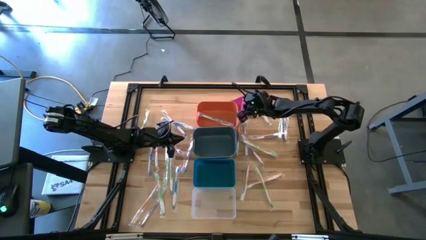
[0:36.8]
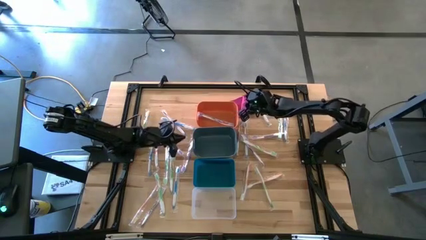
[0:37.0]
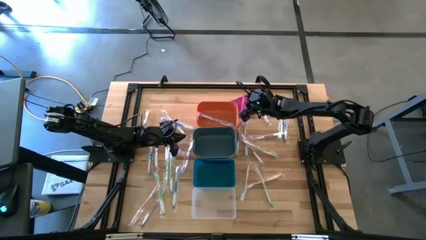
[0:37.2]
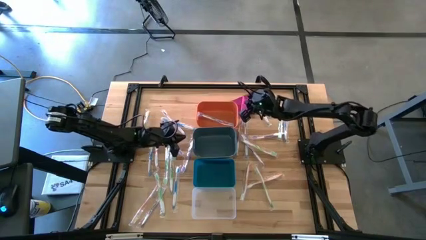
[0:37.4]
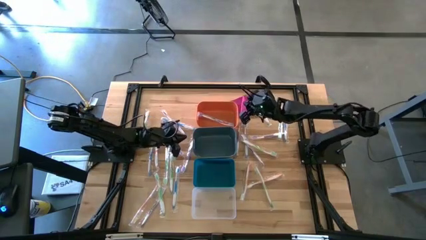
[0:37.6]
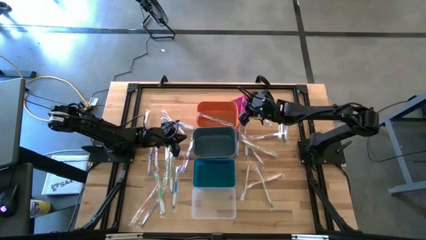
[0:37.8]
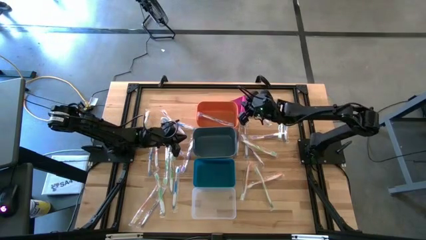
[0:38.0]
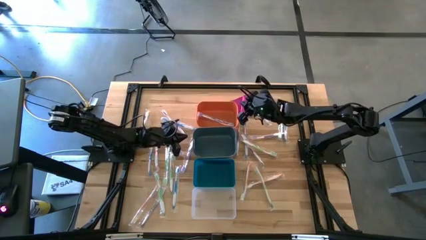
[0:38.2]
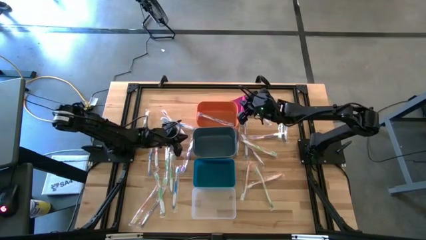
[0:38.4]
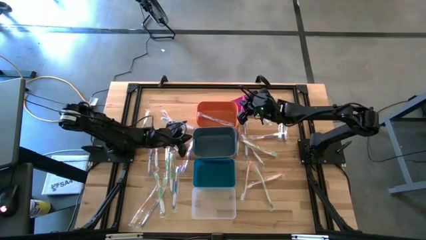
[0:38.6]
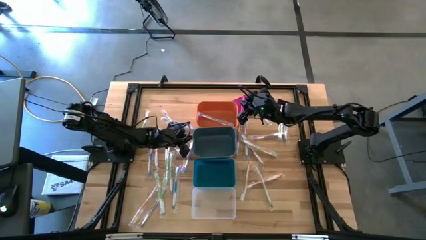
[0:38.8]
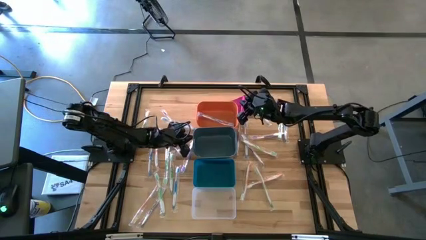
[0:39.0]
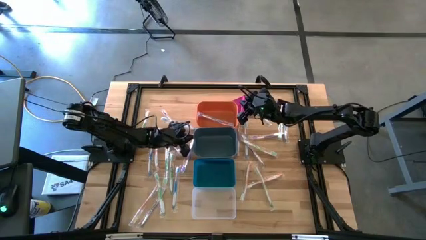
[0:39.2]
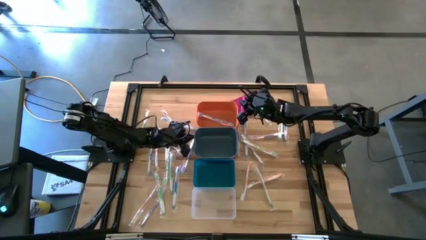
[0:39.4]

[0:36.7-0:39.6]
Task: Pick & Place Toothbrushes
Adjust the green bin

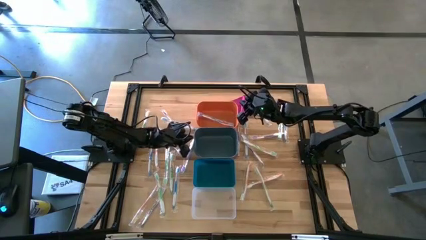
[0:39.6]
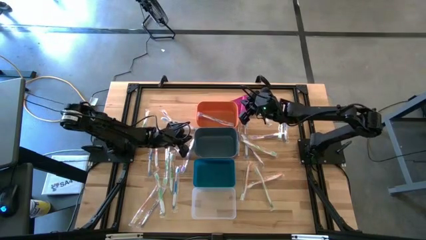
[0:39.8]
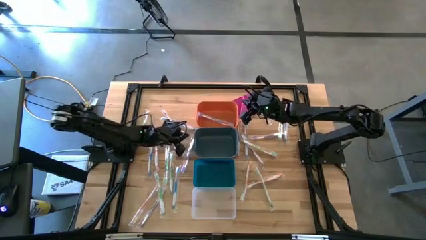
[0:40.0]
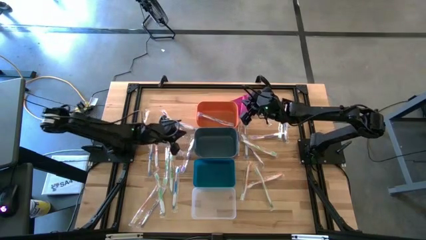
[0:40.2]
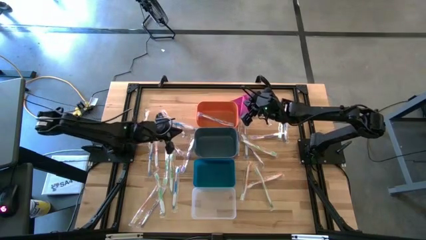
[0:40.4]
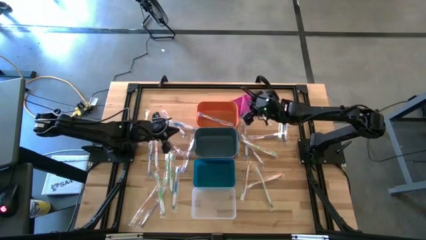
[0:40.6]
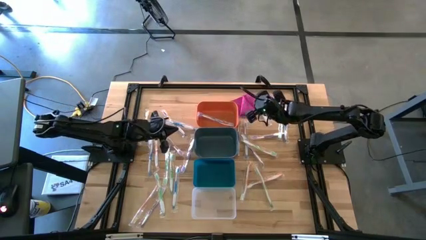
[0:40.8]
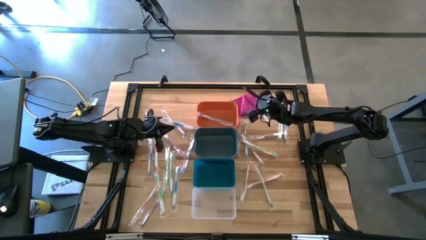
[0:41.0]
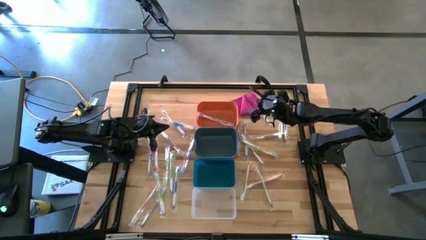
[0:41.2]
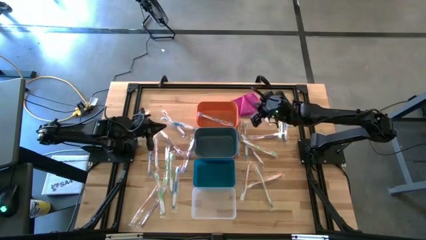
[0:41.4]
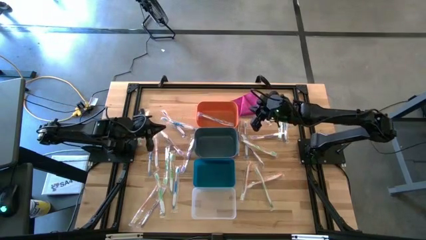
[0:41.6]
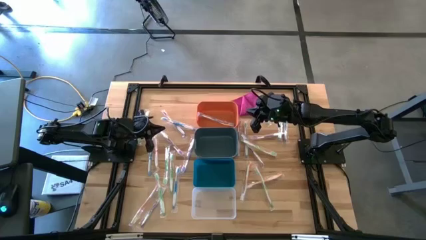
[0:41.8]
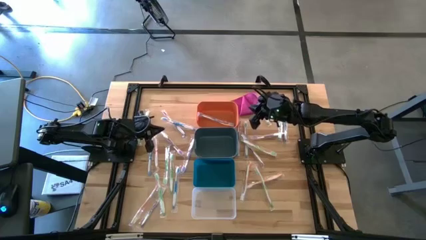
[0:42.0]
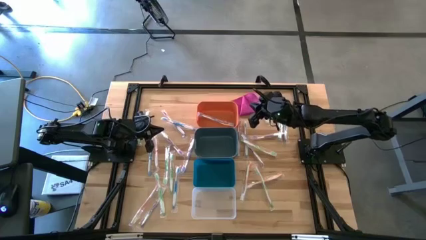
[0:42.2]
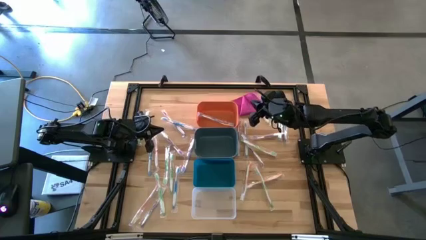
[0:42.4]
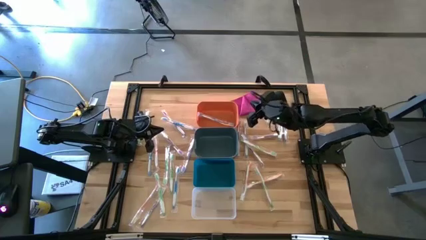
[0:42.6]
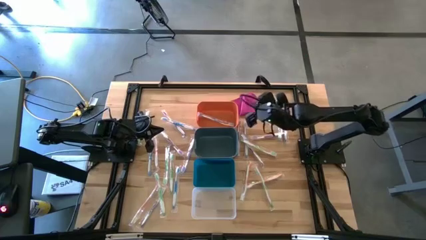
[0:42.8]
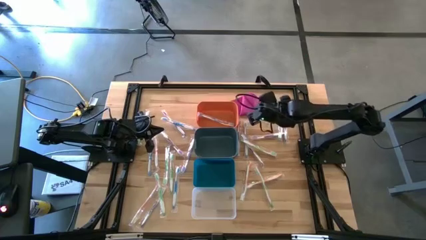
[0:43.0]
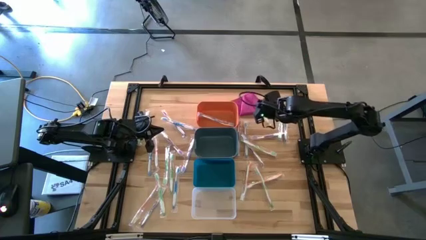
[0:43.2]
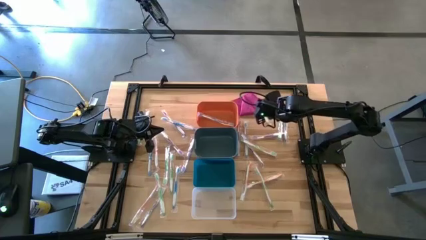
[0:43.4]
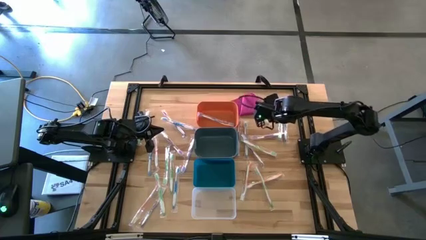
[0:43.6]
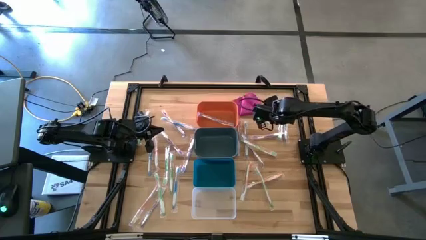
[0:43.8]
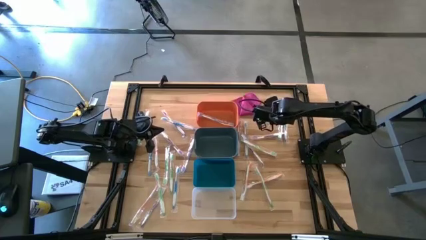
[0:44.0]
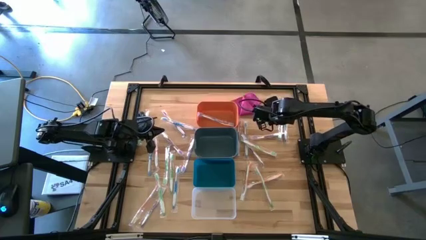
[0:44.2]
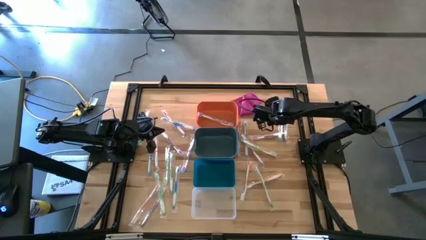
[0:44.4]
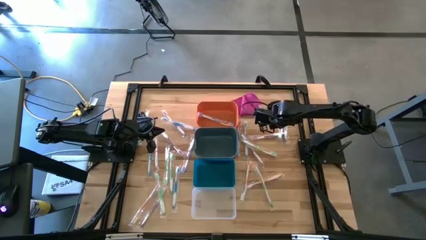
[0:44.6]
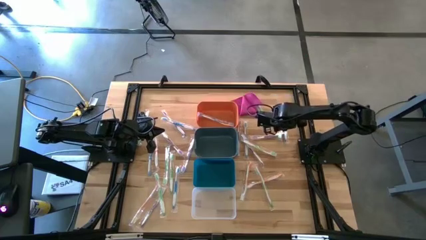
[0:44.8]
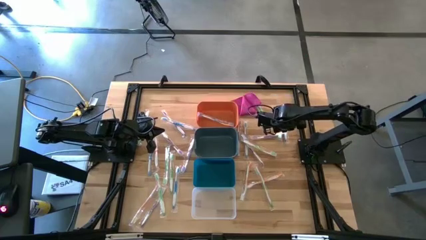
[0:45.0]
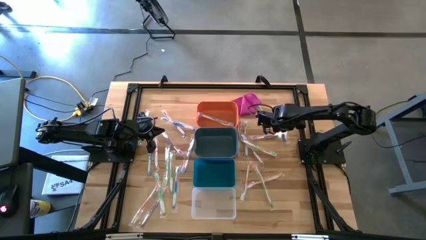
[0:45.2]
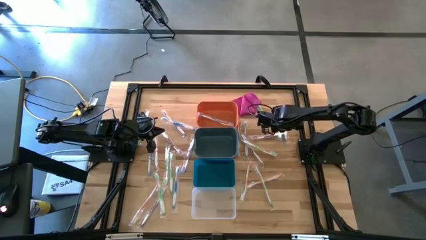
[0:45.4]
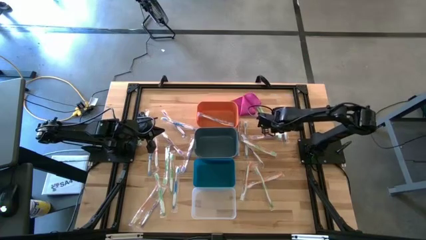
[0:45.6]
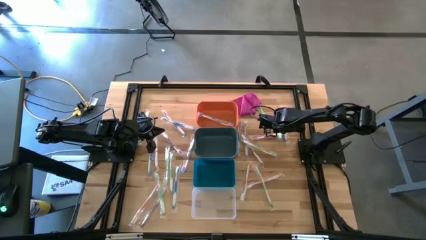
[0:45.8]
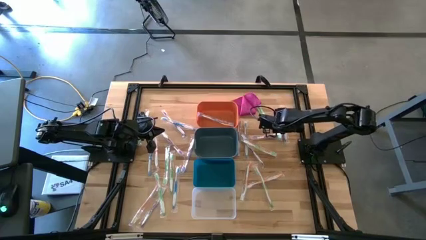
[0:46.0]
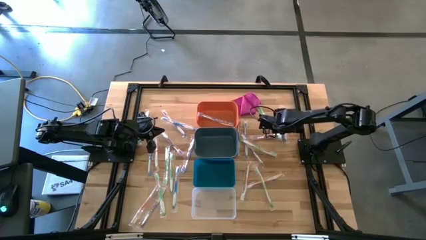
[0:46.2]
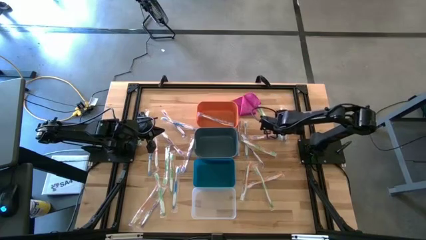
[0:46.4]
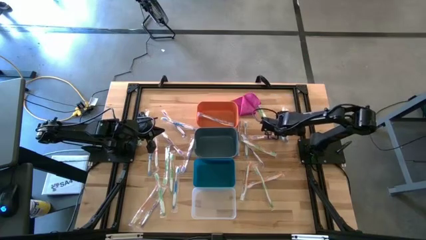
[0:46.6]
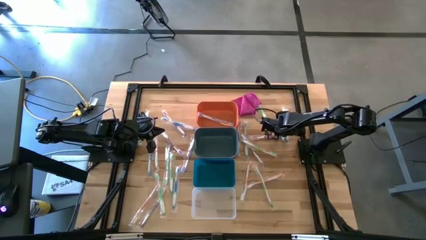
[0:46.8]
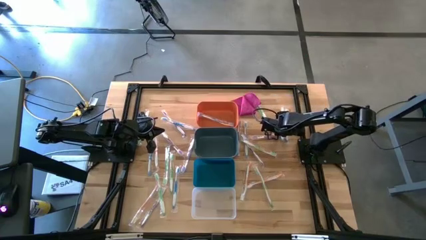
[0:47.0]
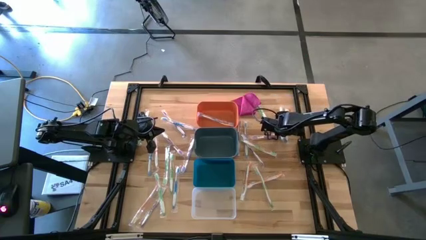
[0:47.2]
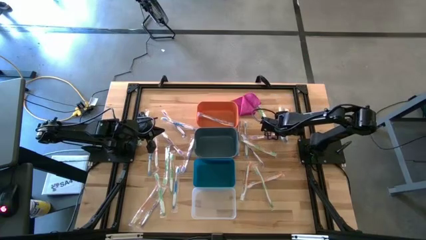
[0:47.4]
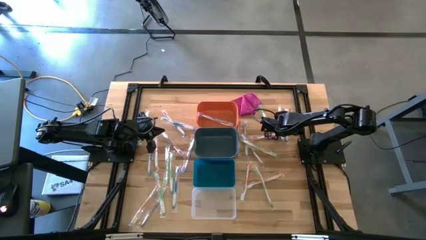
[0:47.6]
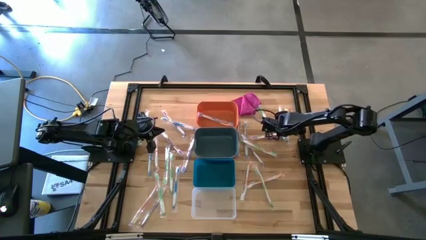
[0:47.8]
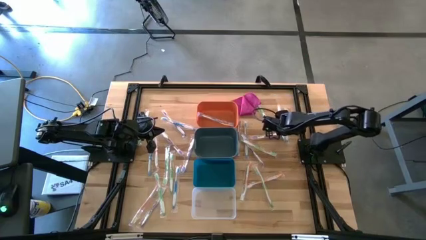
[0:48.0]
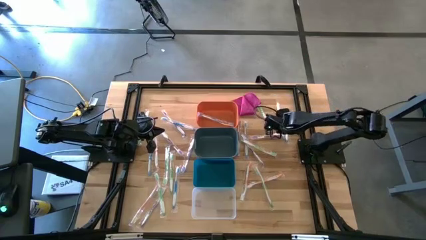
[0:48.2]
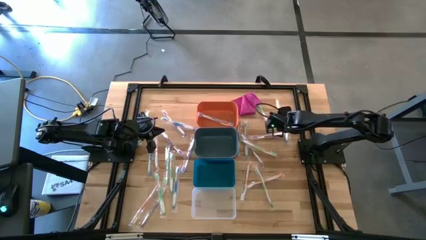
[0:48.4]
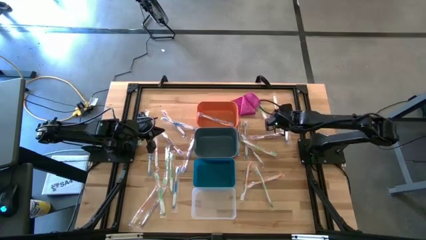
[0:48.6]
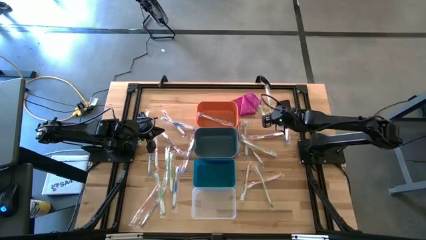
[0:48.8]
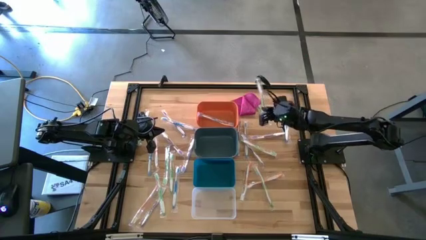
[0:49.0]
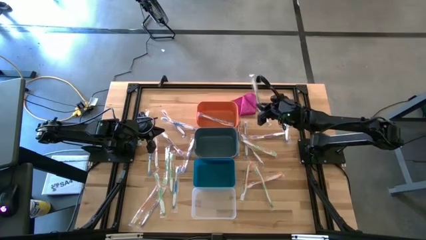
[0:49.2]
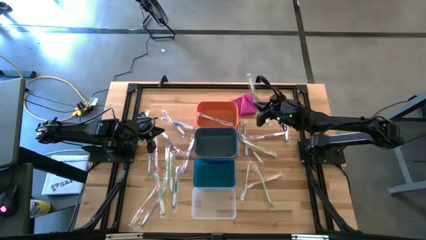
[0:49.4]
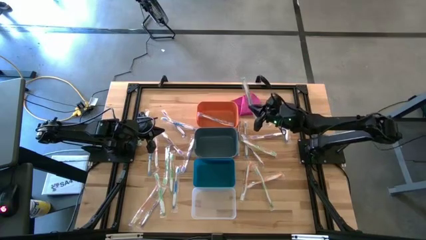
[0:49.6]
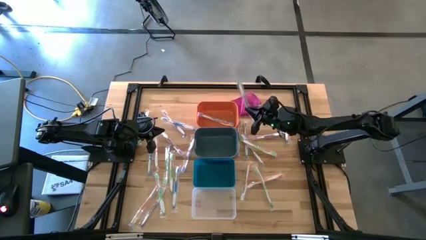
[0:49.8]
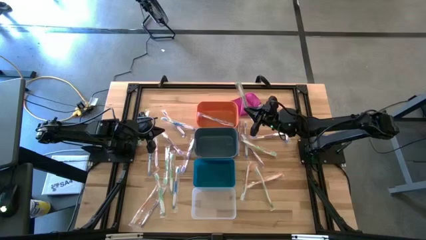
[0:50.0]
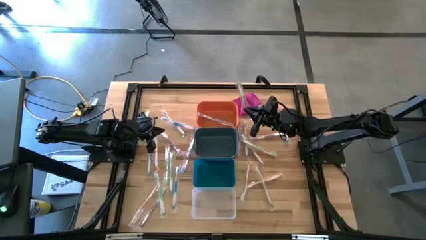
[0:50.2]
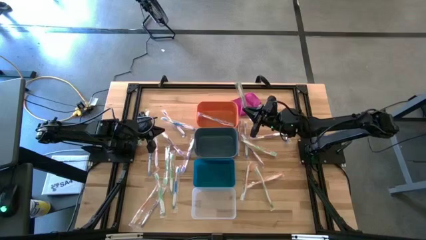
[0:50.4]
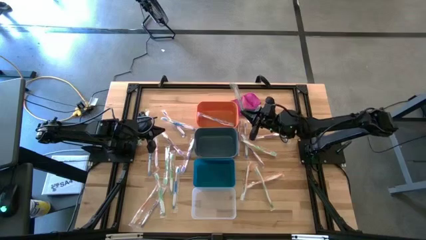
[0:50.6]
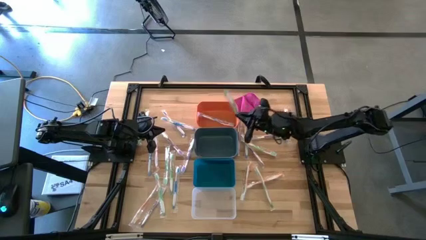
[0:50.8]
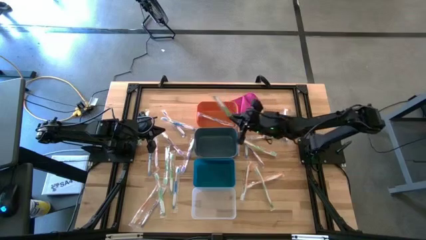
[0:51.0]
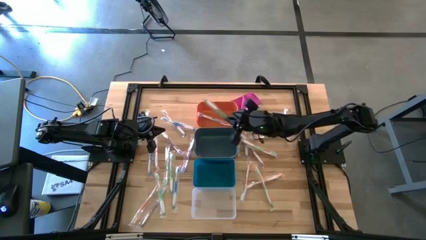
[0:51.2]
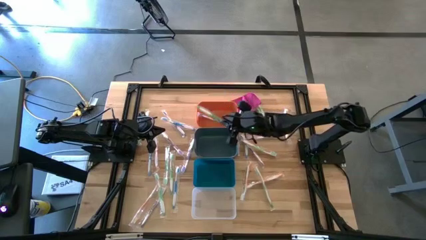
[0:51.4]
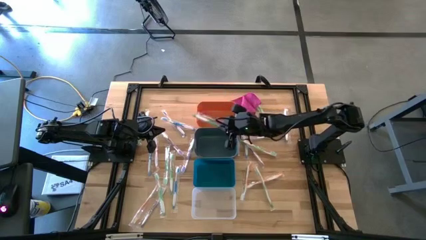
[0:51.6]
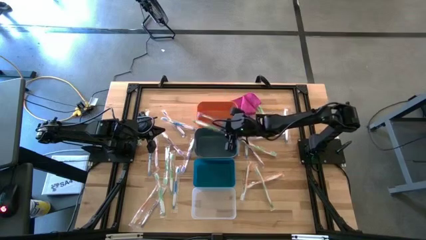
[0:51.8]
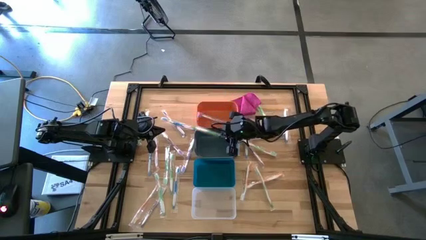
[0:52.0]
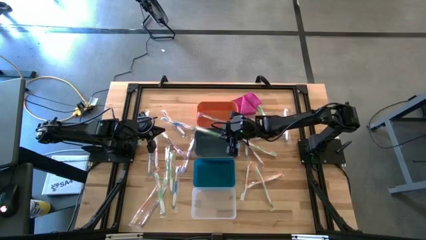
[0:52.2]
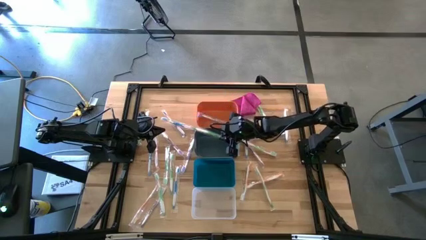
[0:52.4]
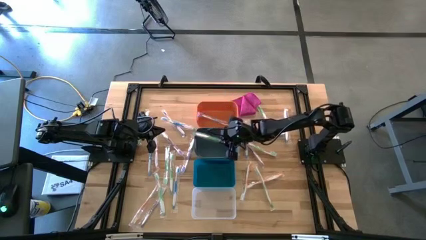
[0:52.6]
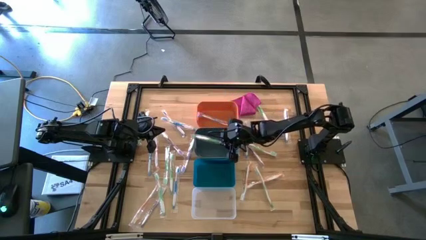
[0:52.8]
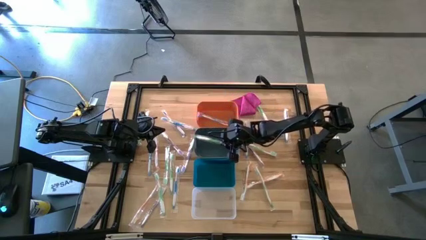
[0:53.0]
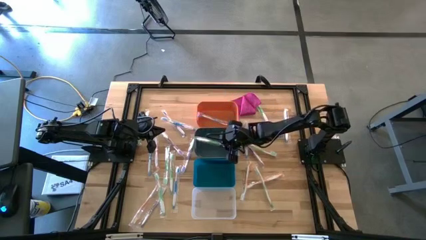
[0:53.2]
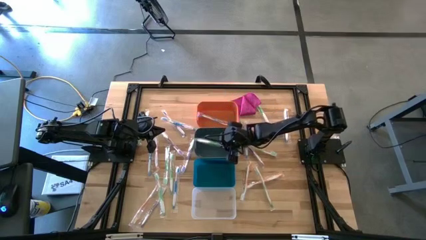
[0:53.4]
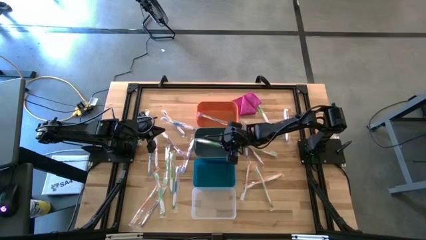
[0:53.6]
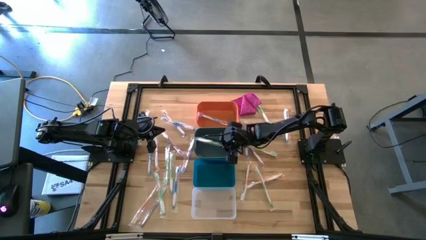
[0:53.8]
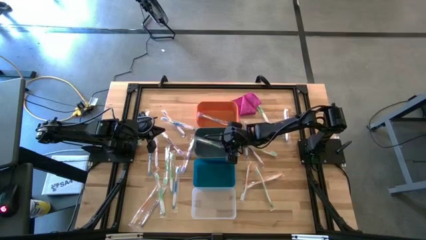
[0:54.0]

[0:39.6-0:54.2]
Put the green toothbrush into the green bin
